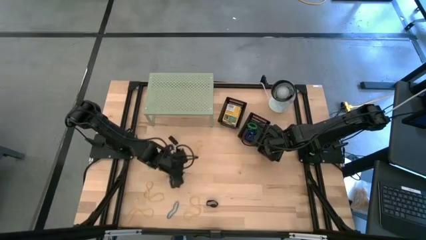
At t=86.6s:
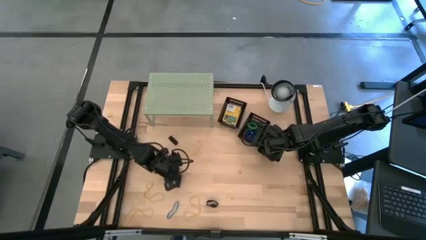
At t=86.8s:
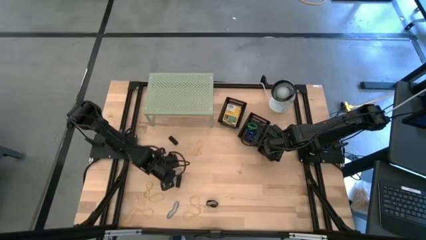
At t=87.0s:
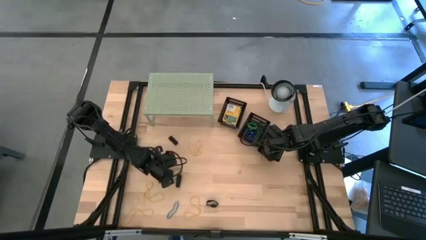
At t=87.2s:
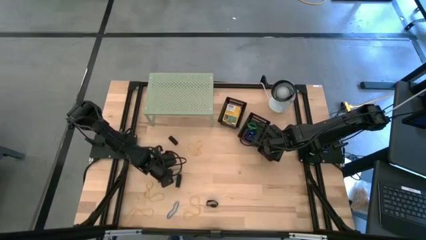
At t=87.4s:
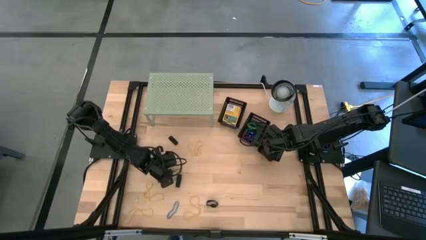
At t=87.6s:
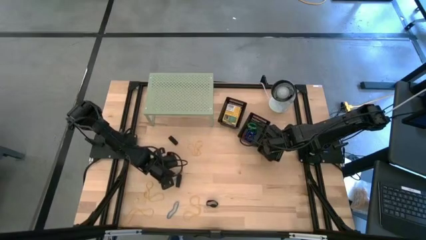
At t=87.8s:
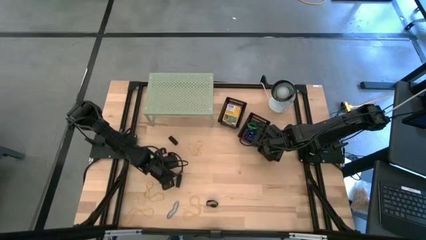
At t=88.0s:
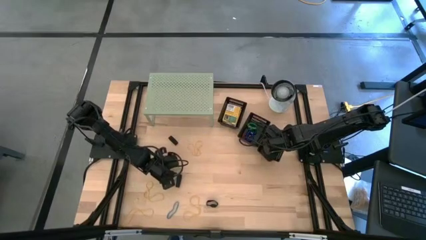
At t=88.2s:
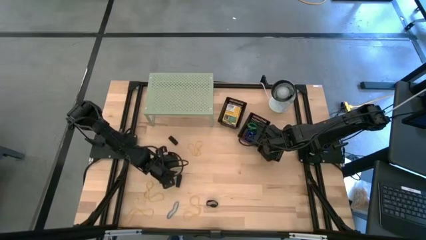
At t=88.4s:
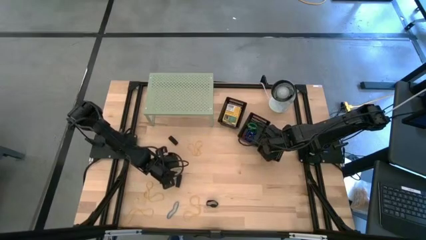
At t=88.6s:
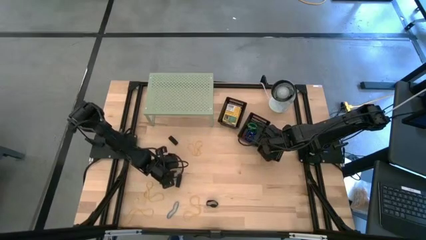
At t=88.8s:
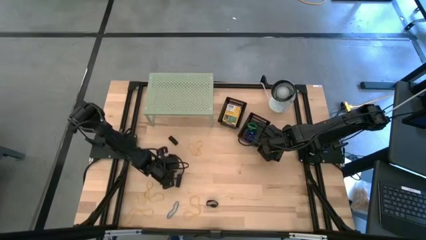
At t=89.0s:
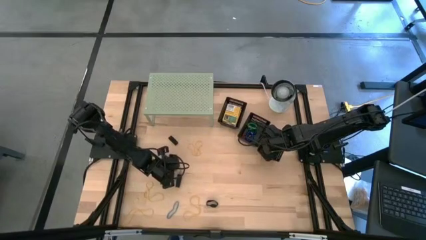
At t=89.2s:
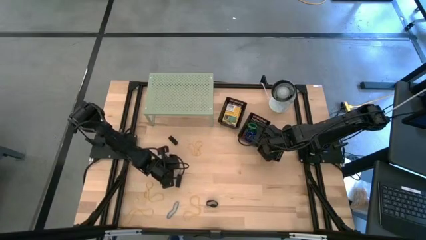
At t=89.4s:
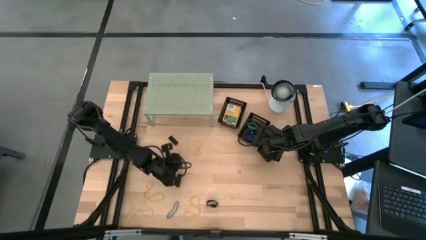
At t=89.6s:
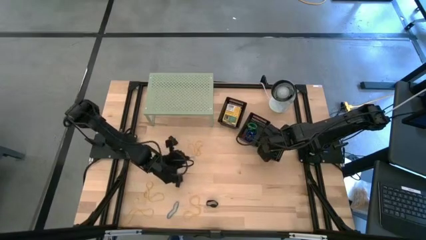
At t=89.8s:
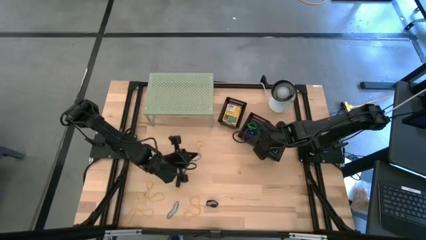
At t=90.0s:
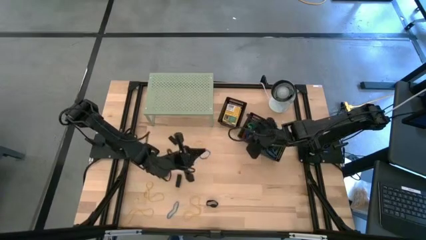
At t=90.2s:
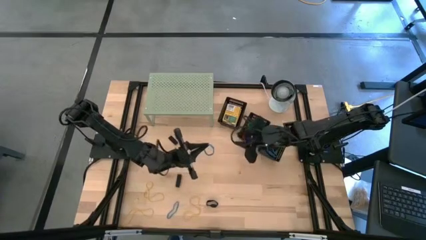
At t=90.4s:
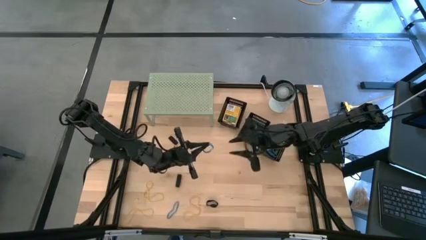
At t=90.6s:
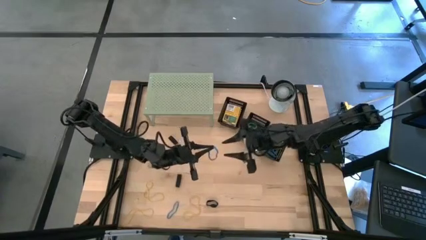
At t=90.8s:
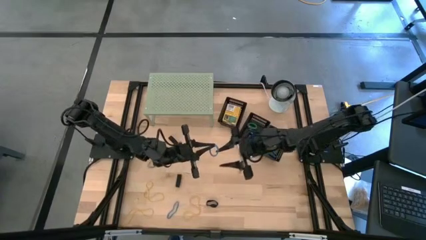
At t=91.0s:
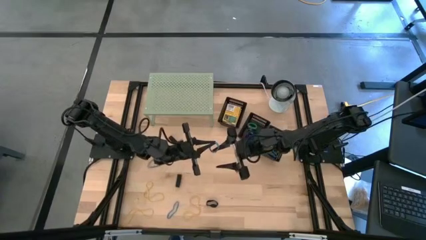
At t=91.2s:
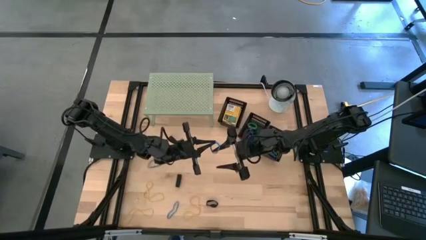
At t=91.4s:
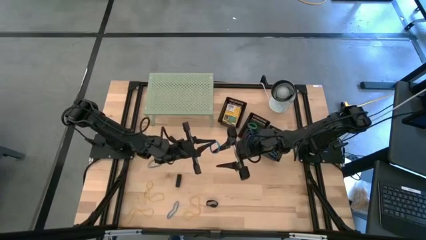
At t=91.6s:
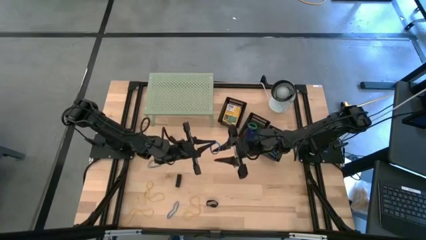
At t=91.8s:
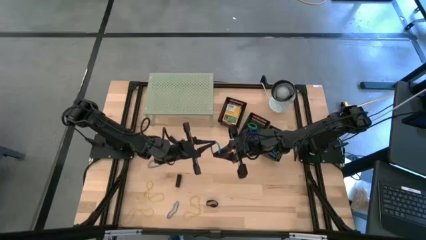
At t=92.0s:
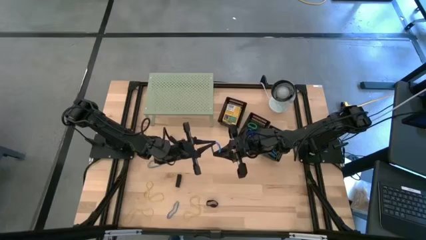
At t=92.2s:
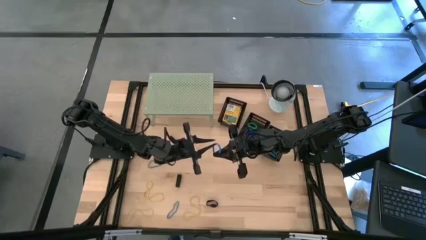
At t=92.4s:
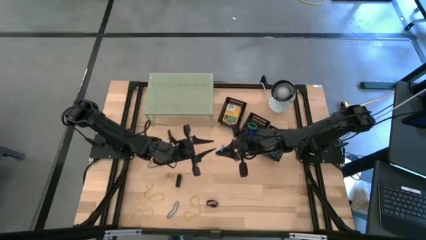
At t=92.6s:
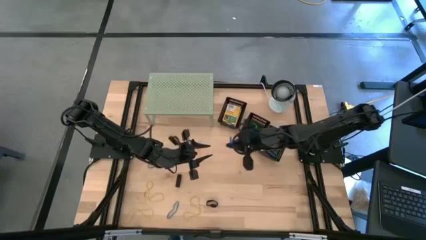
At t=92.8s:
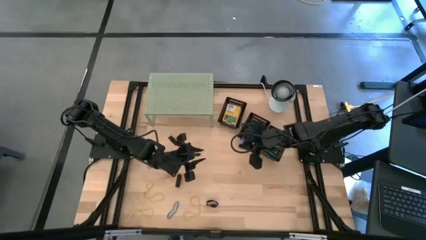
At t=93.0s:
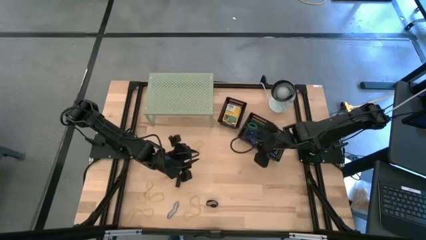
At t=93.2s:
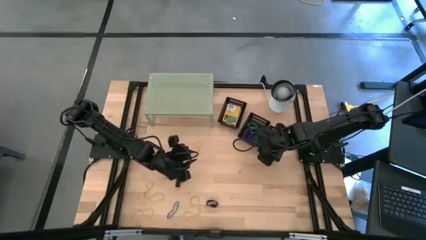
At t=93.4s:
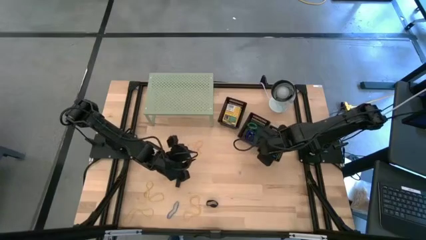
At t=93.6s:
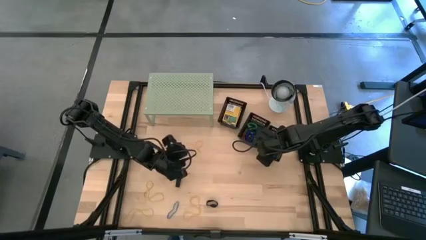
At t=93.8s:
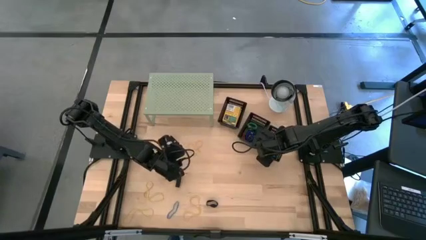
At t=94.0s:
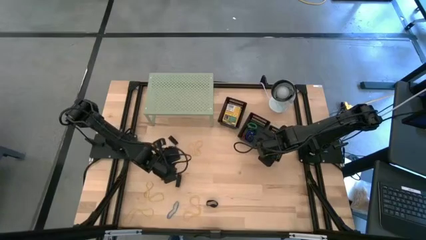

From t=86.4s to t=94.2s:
Task: Pick & Place Office Desk Supplies
Put the blue rubber band into the bottom black bin

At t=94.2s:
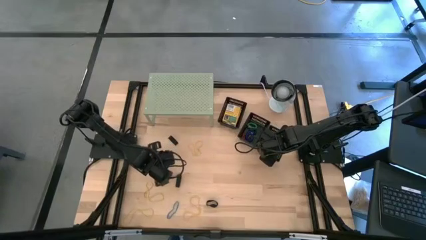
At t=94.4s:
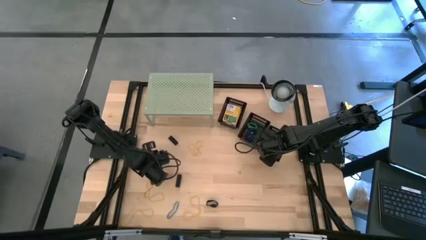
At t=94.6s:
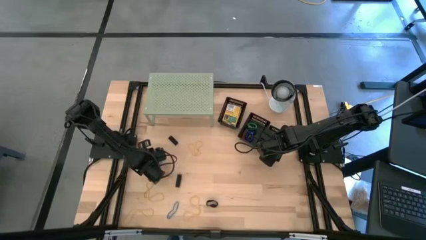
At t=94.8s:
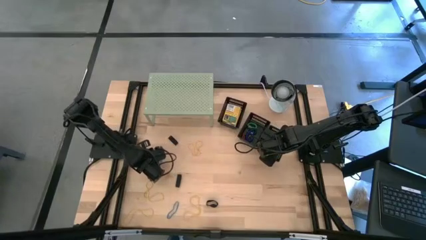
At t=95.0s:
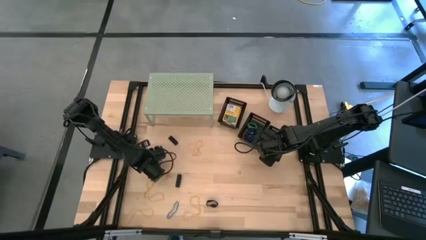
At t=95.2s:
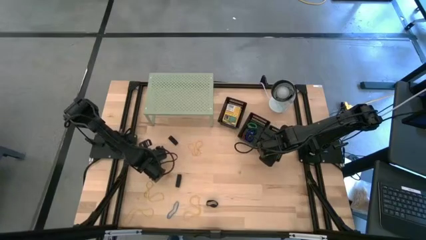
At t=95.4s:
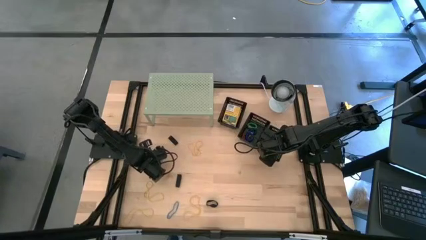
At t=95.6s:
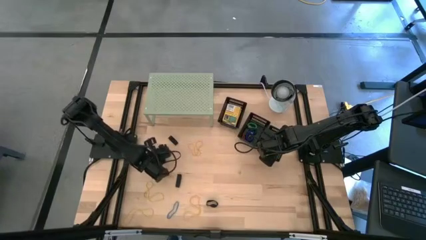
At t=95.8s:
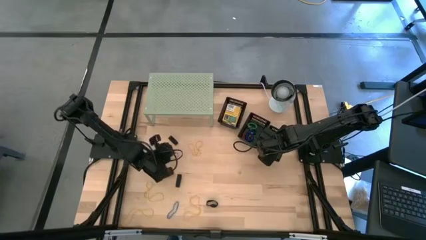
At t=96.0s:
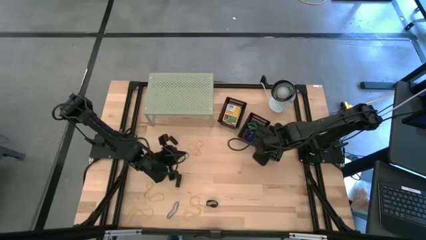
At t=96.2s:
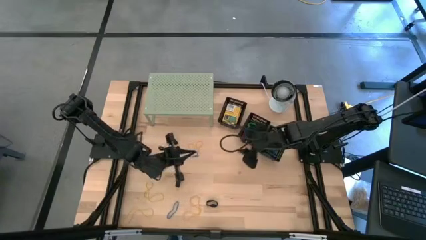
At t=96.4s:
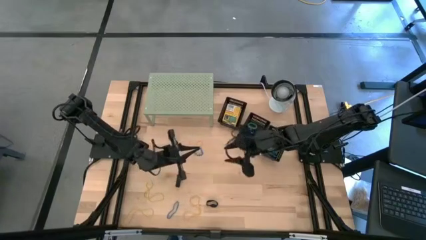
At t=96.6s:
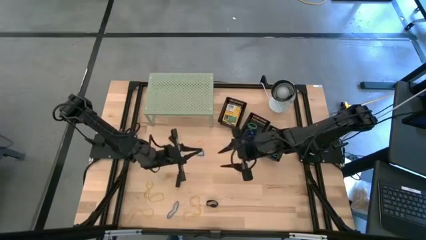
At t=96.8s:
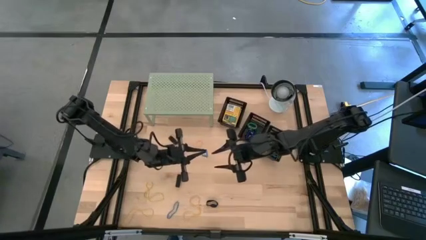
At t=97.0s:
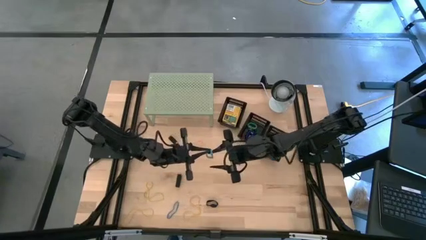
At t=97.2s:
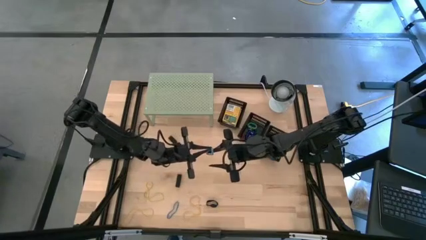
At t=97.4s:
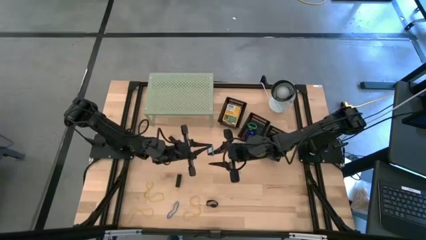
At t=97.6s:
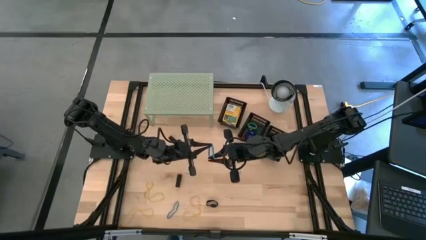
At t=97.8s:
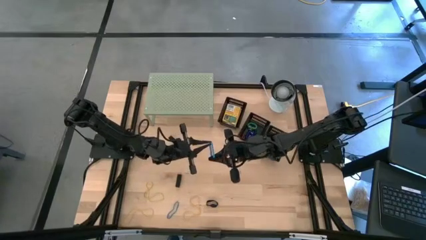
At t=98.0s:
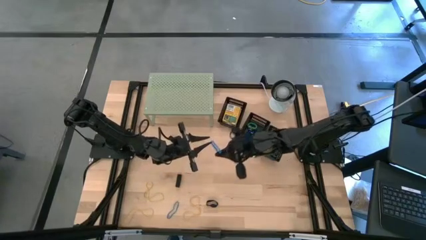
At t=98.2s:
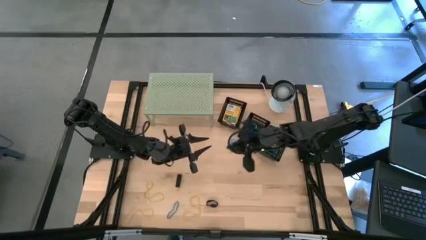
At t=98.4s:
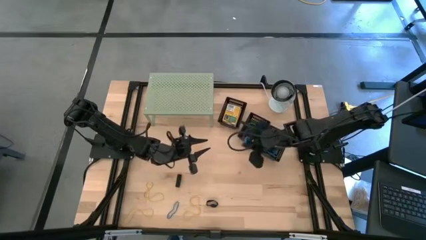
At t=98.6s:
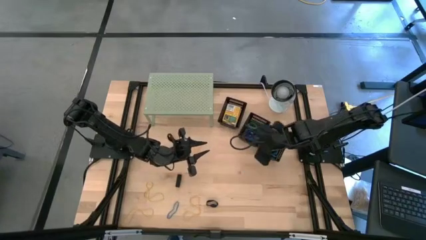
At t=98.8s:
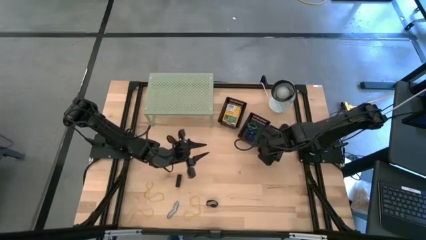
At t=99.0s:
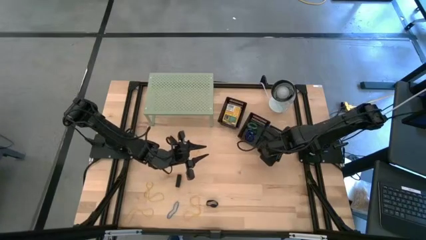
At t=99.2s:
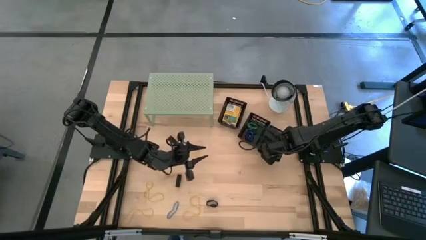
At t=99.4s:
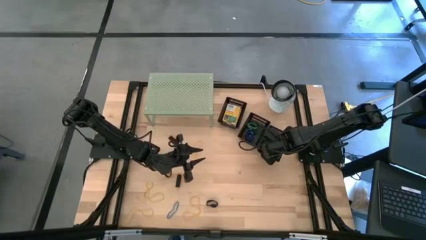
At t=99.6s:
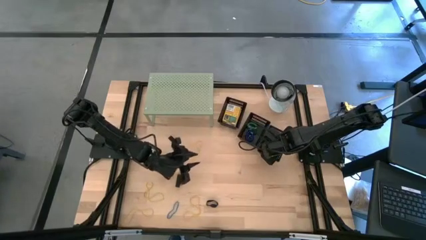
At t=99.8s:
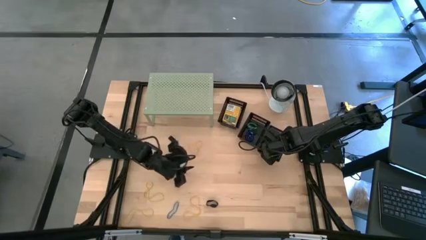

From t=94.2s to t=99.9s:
Put the blue rubber band into the bottom black bin
